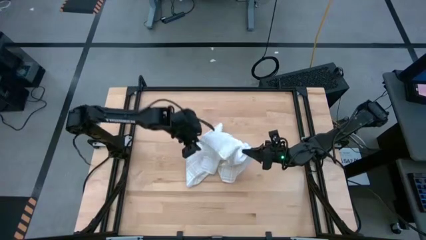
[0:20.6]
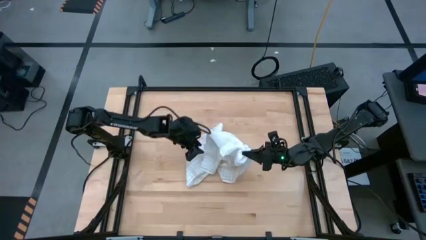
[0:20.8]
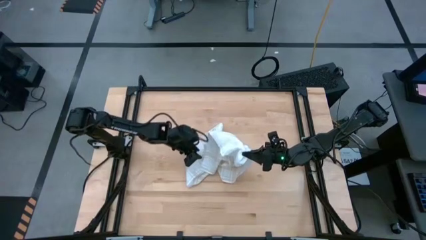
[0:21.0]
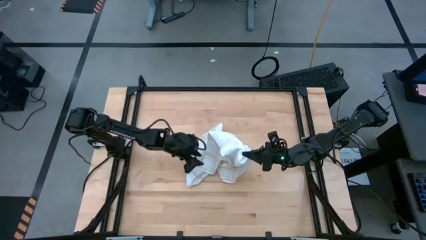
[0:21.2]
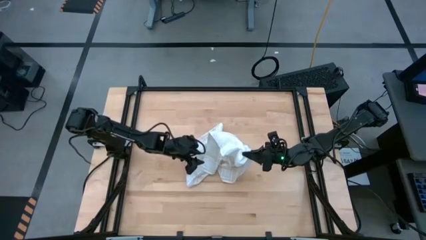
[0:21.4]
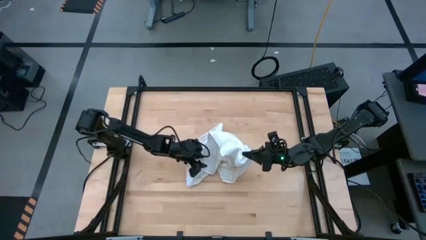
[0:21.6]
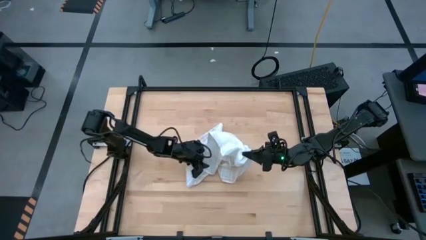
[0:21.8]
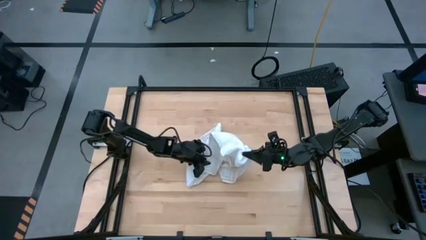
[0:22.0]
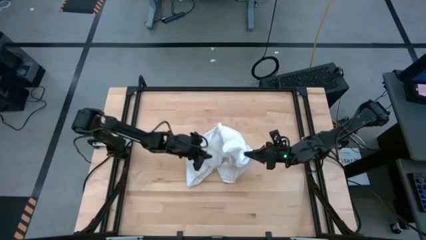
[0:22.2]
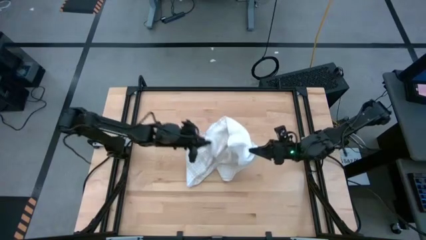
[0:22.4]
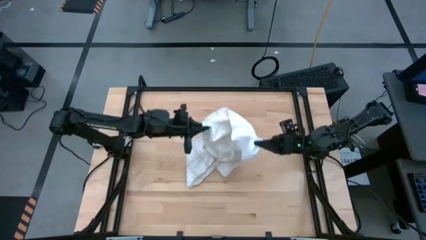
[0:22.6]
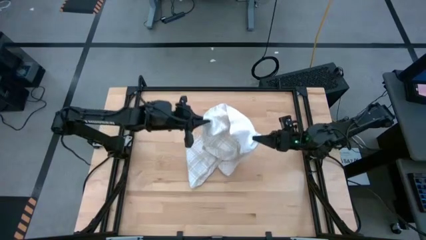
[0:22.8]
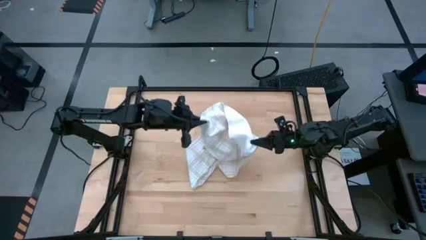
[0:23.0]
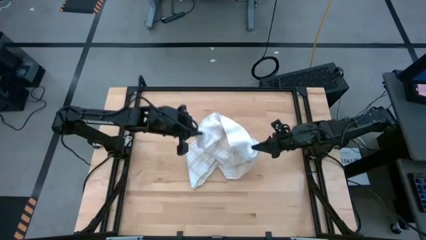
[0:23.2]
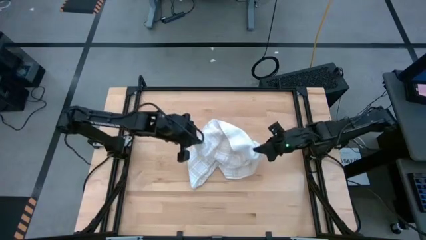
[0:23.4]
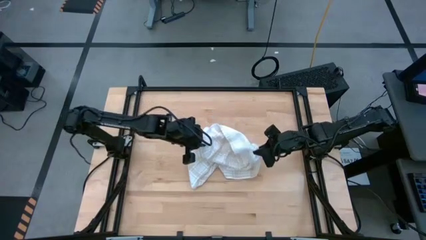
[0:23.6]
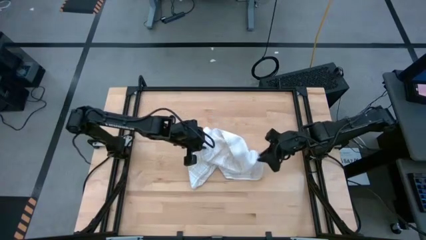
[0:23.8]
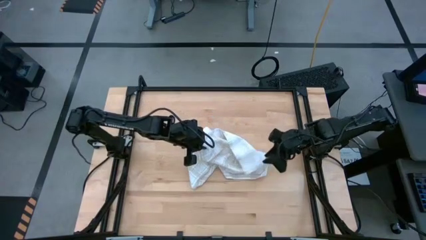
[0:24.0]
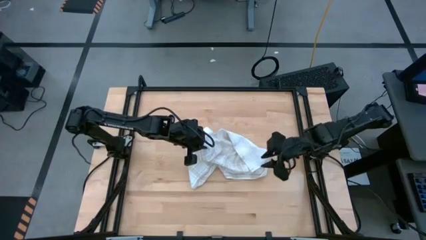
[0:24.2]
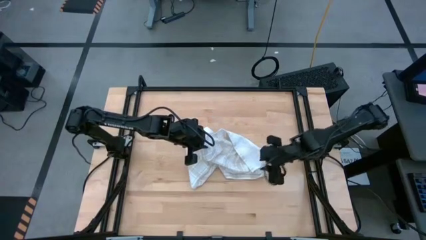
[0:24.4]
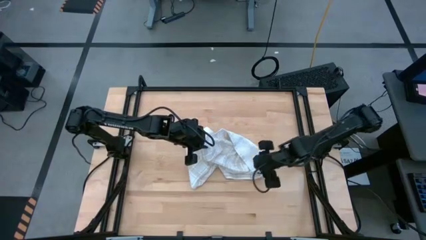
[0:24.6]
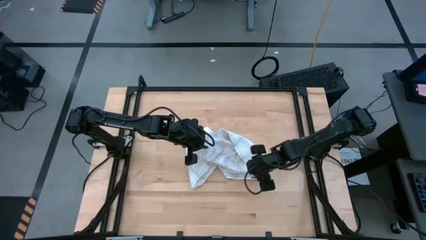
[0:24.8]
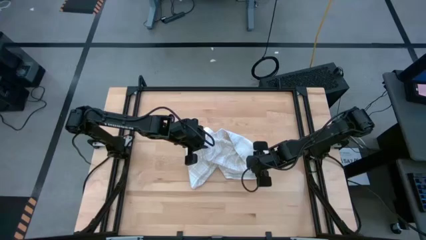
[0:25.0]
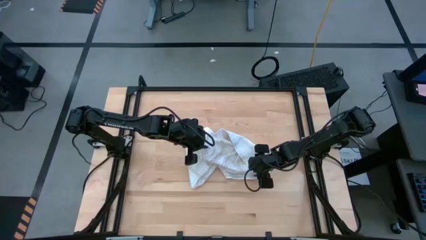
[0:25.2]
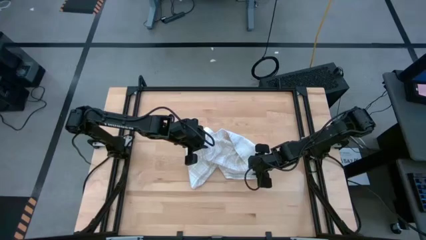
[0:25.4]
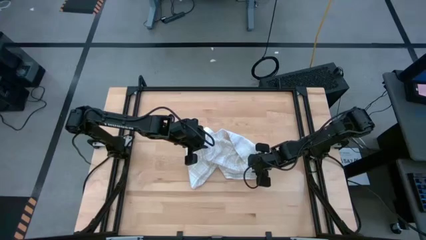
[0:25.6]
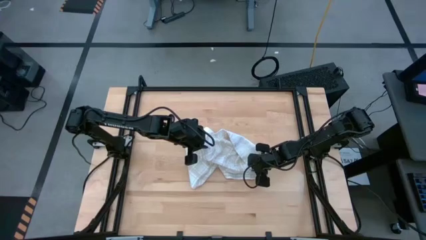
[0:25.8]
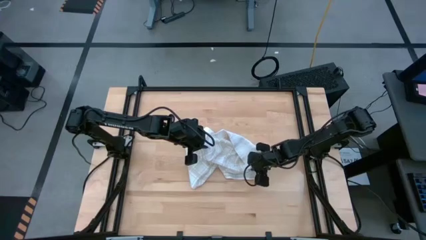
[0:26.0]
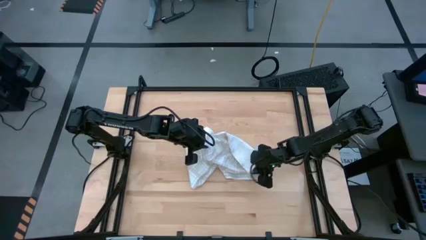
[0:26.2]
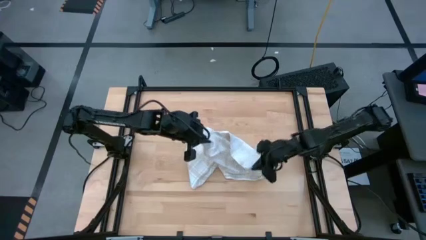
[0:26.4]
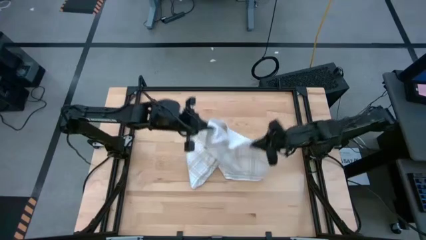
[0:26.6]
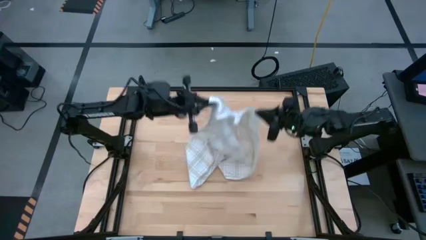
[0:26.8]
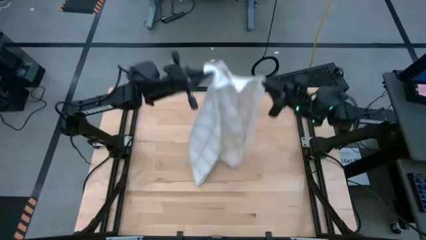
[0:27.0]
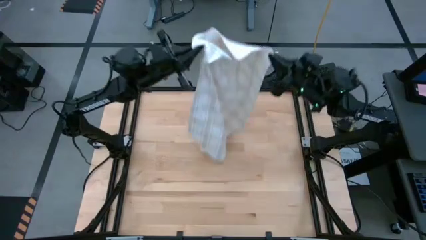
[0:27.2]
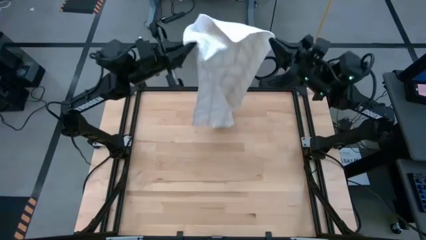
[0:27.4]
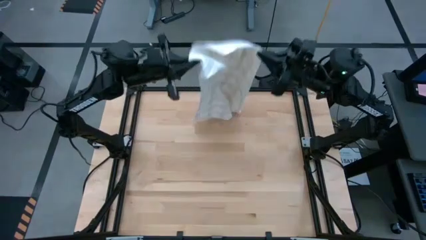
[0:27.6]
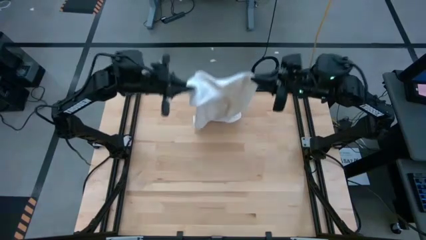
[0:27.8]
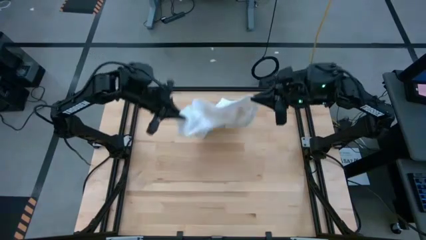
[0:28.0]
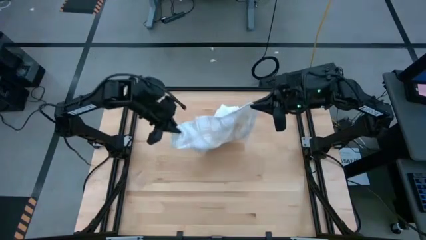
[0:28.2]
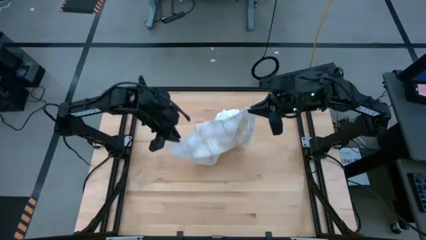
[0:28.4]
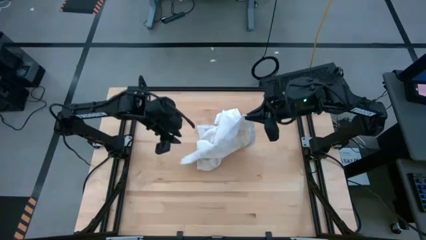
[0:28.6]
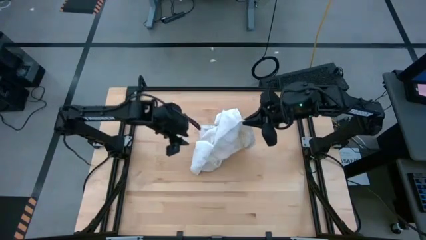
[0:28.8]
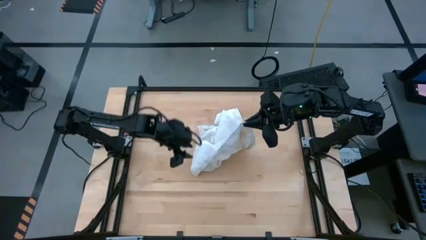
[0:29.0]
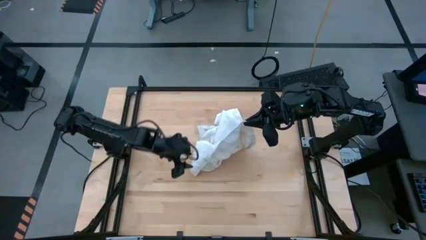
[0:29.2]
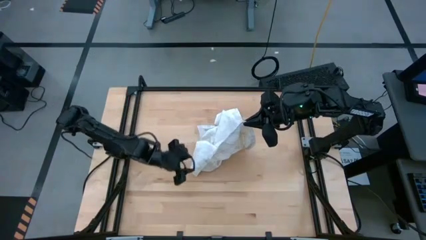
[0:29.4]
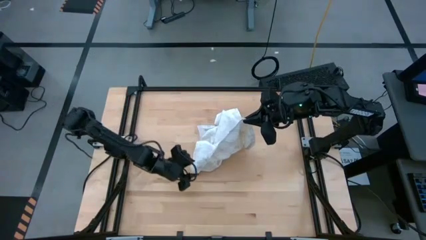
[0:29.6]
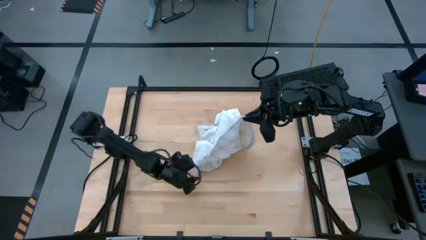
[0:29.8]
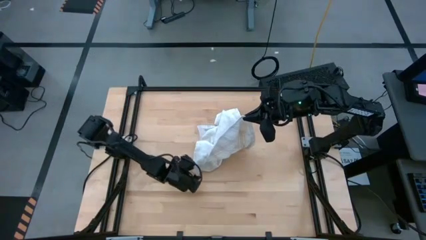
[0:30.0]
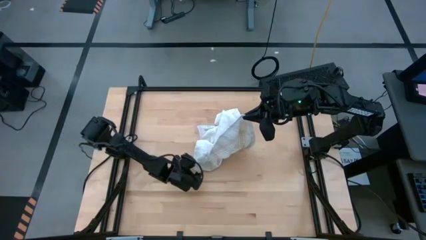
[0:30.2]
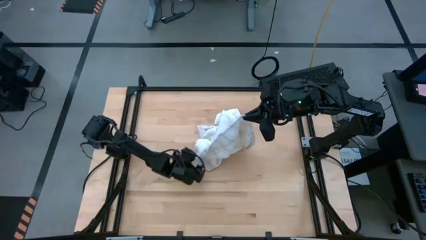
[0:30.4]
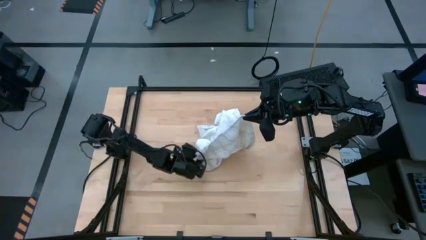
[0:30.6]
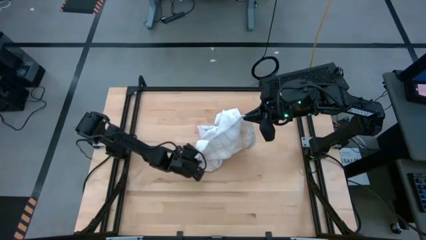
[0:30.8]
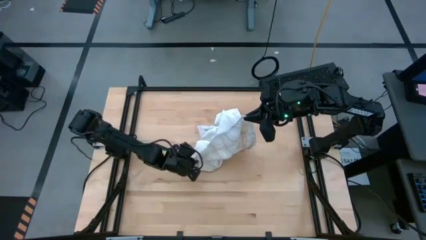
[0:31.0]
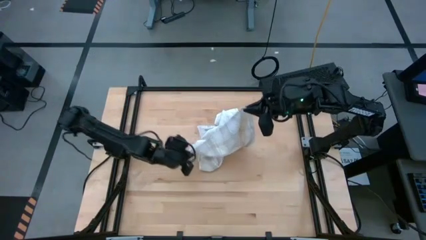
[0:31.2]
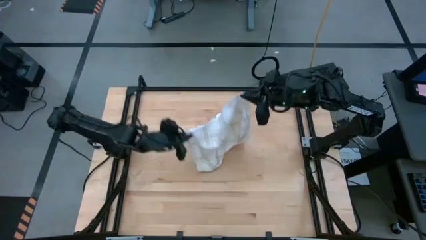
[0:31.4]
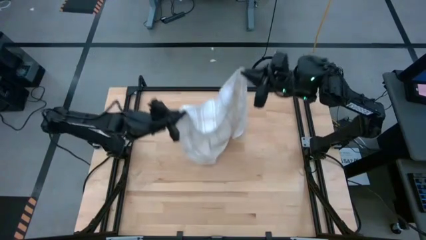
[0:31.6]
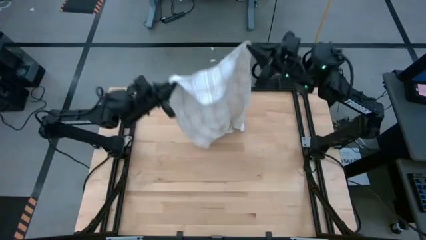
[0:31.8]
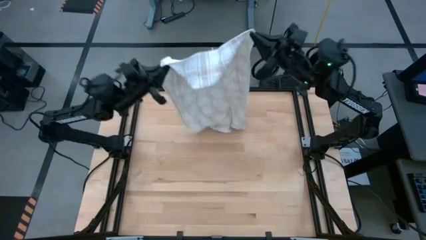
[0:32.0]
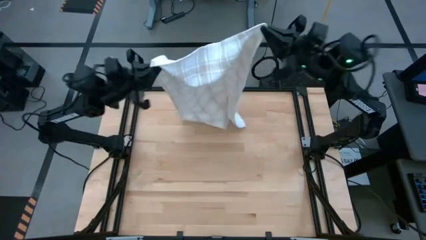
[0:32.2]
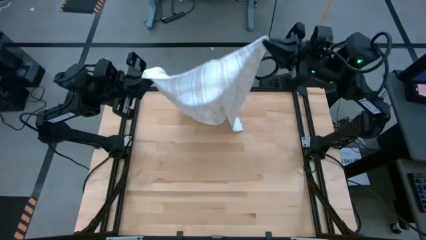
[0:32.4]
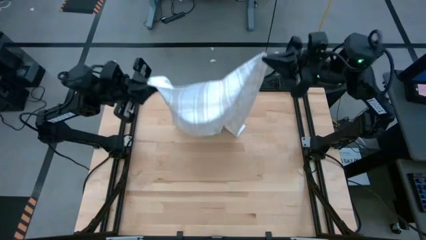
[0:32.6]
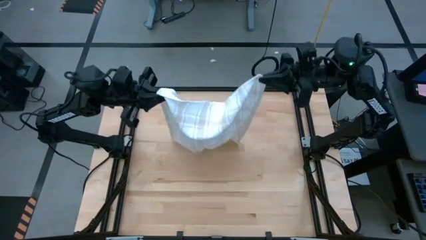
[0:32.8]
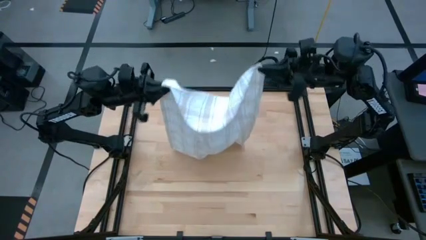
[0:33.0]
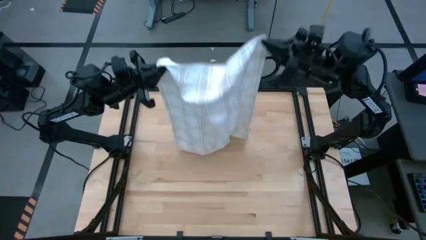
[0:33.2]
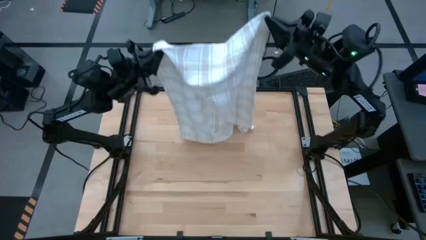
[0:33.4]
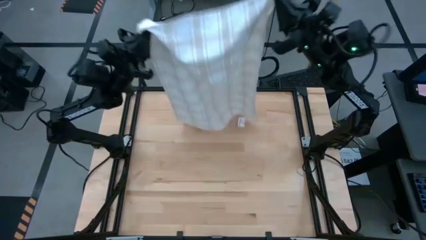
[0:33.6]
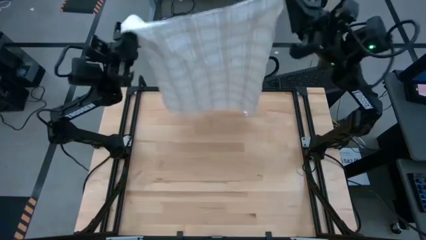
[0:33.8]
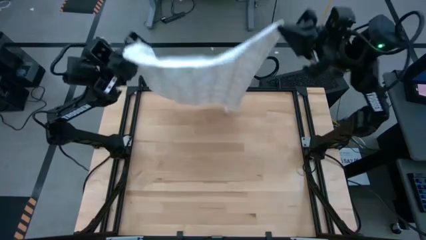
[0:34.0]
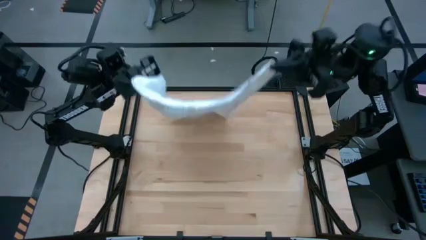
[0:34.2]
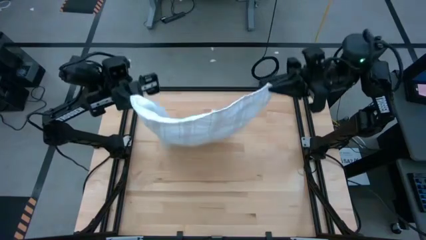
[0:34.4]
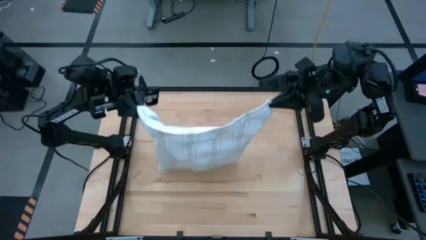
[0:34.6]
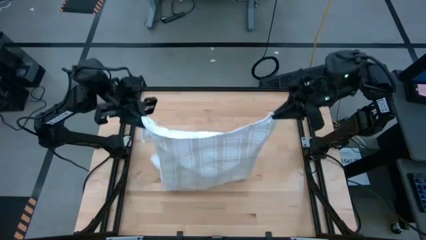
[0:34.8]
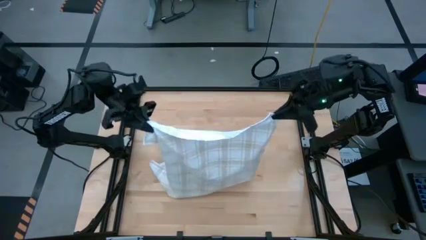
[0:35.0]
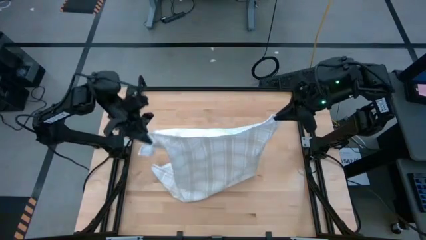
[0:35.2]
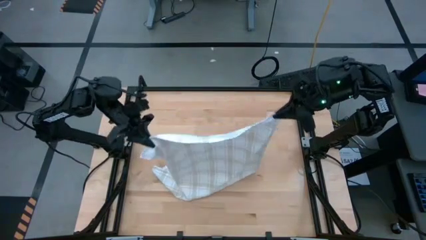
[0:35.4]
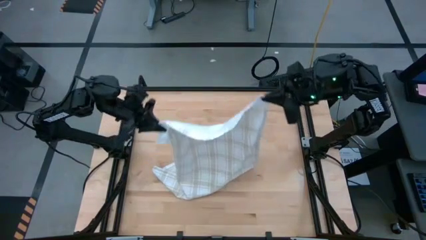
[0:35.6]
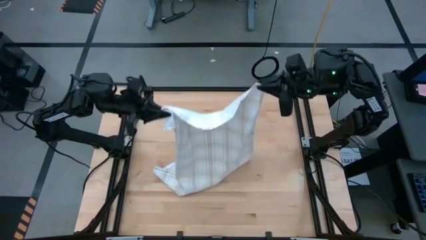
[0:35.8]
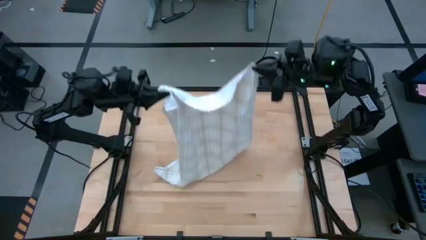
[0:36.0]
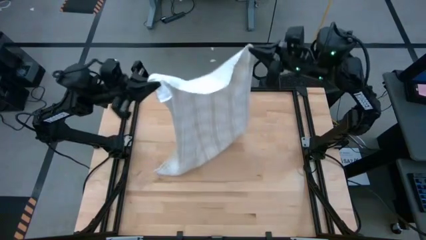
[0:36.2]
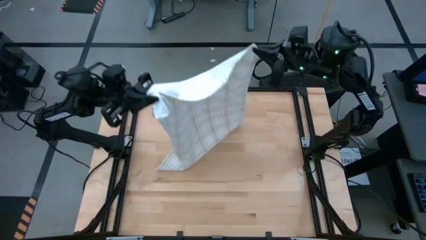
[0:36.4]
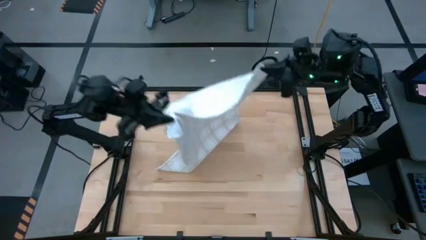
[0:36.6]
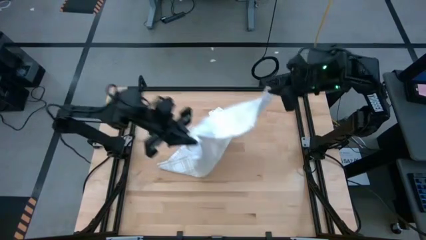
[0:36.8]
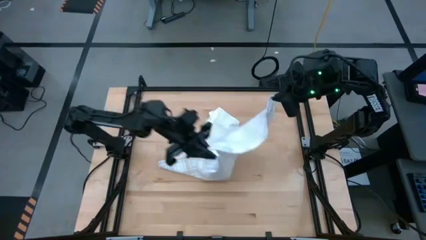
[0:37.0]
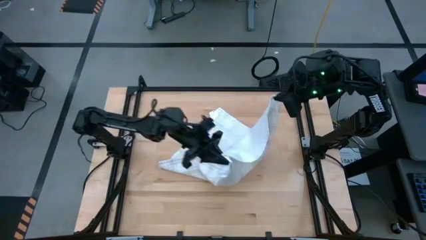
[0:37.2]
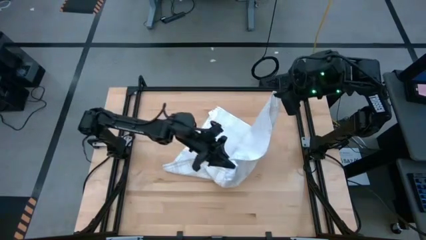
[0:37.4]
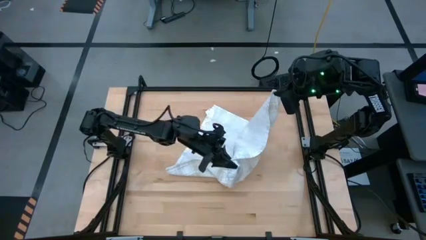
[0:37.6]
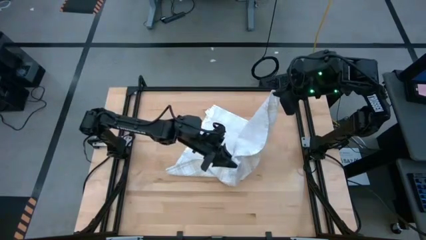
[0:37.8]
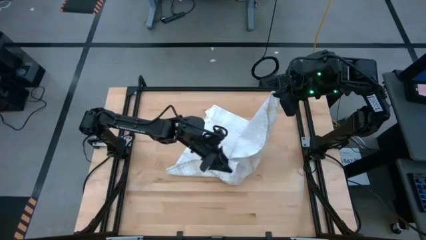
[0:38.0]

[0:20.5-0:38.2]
Task: Roll towel
Roll the towel
